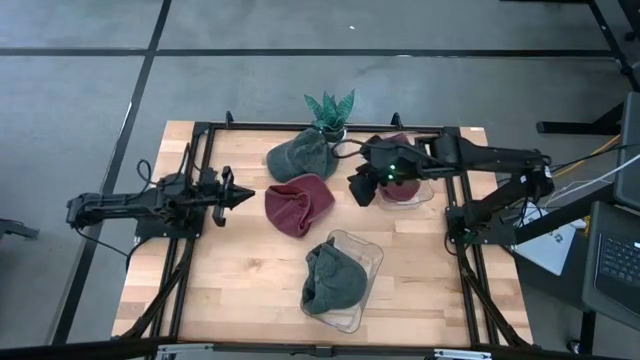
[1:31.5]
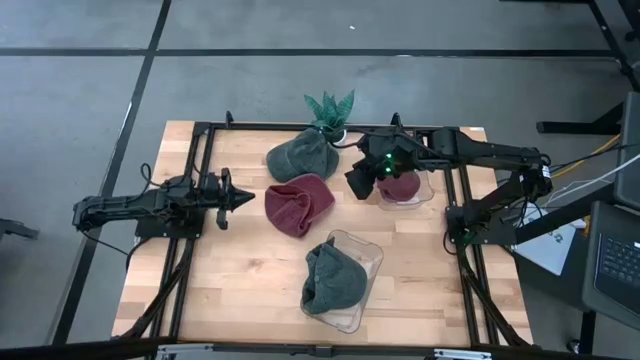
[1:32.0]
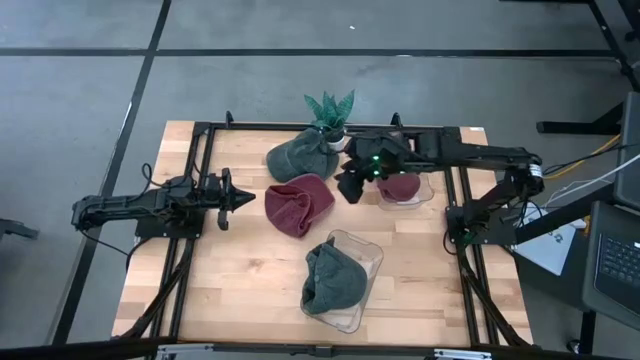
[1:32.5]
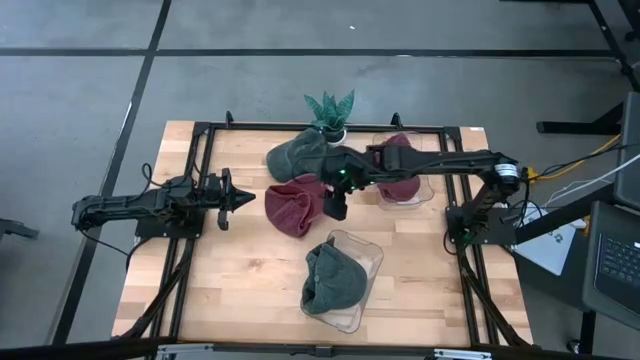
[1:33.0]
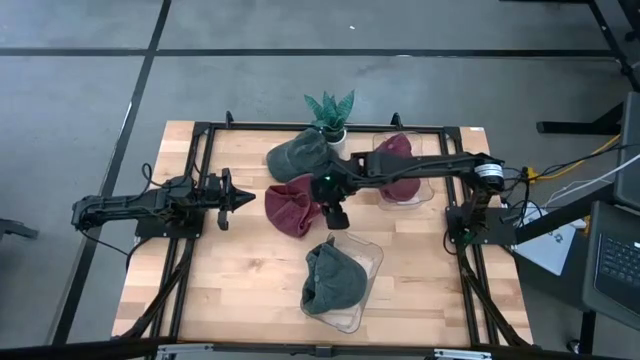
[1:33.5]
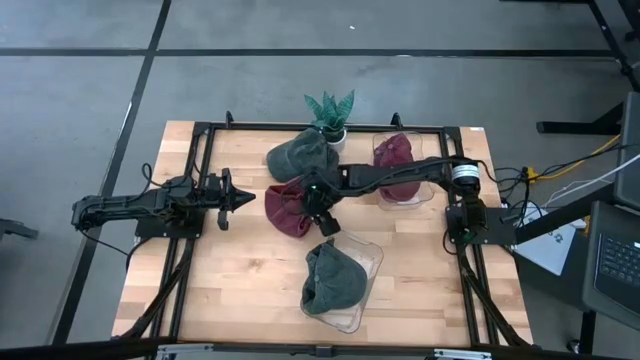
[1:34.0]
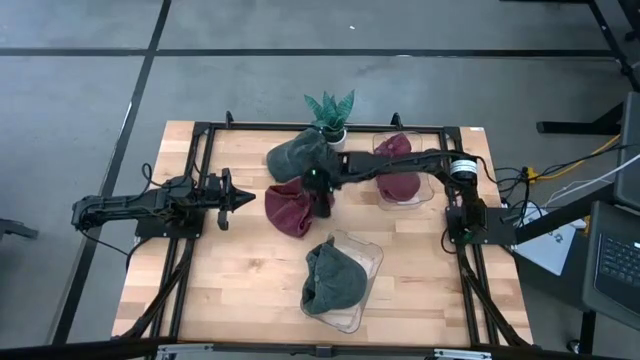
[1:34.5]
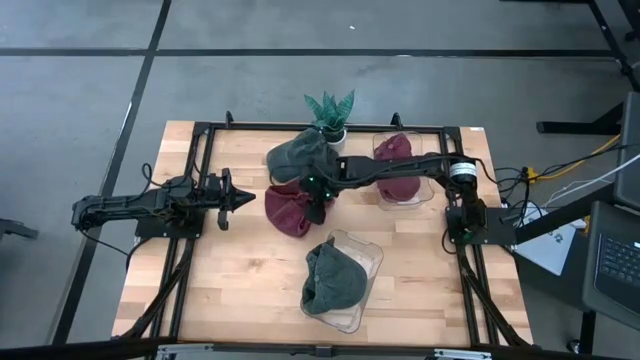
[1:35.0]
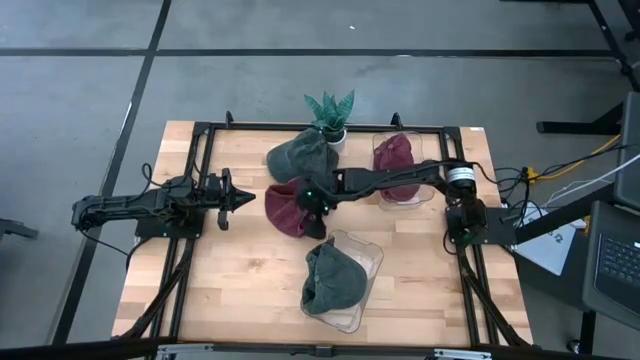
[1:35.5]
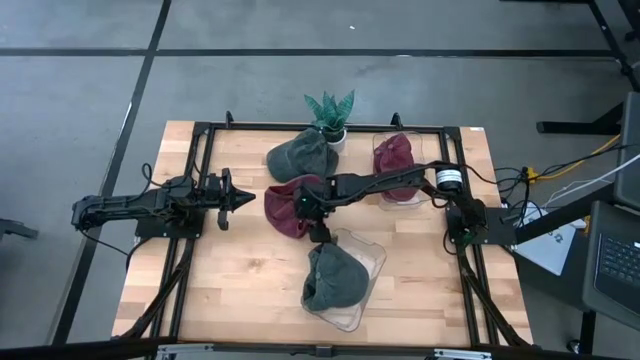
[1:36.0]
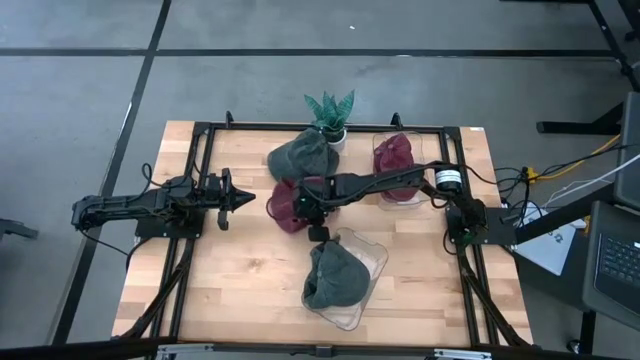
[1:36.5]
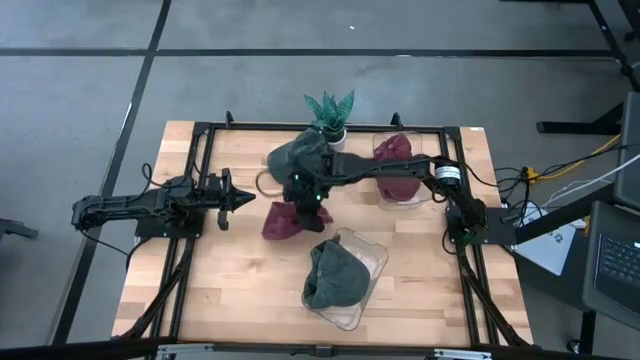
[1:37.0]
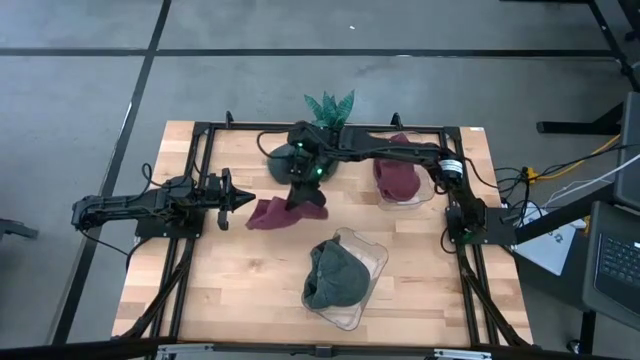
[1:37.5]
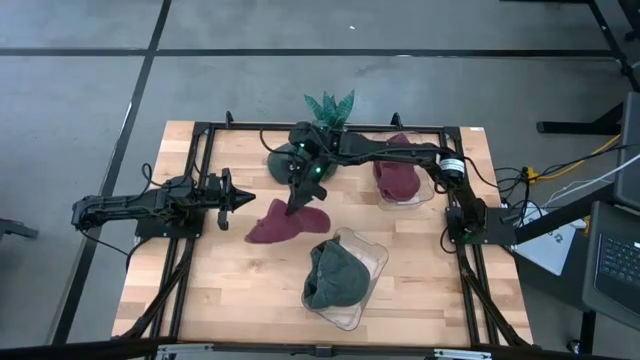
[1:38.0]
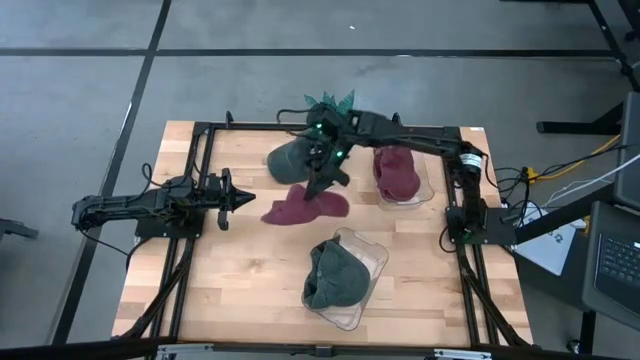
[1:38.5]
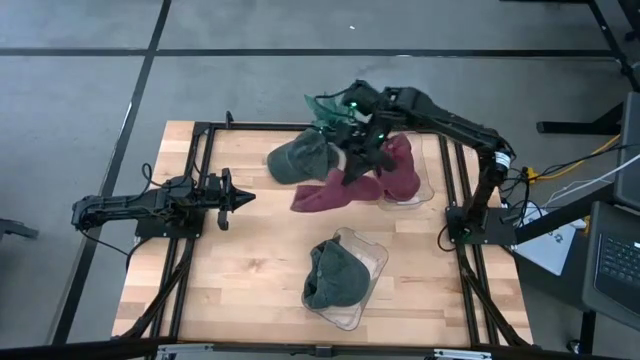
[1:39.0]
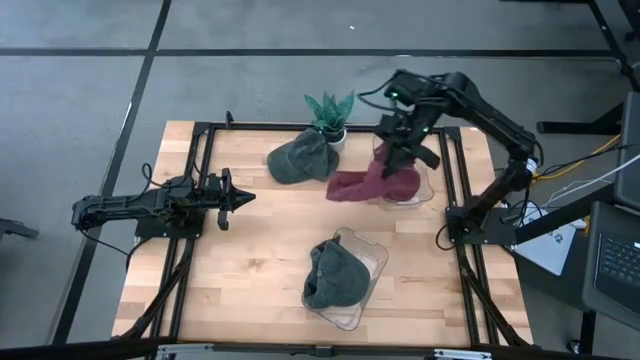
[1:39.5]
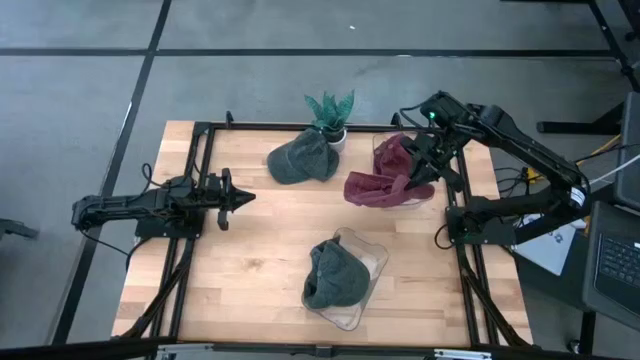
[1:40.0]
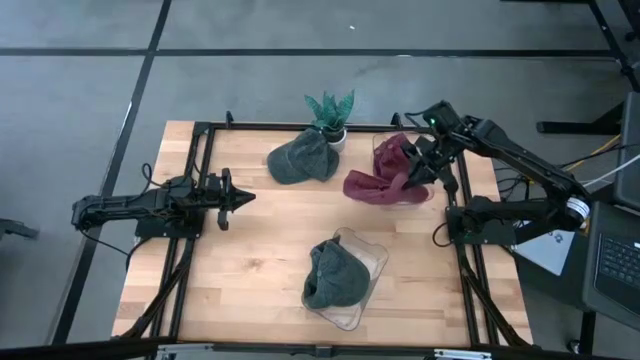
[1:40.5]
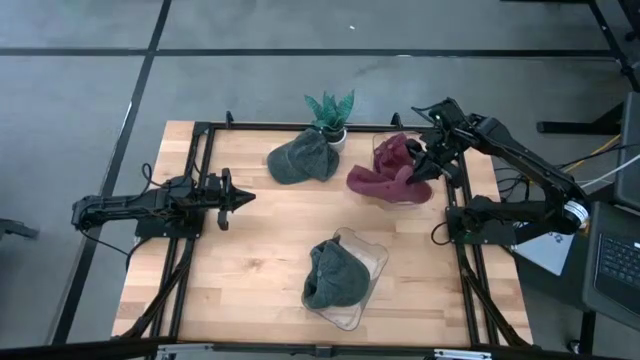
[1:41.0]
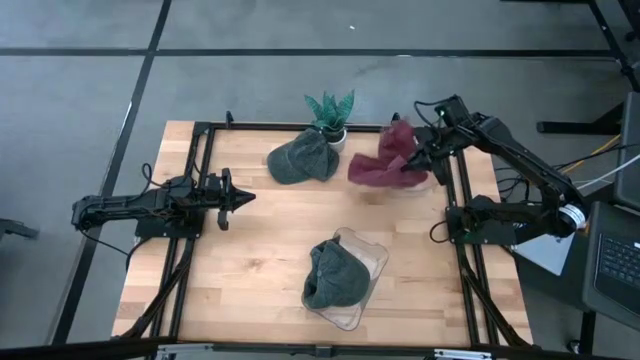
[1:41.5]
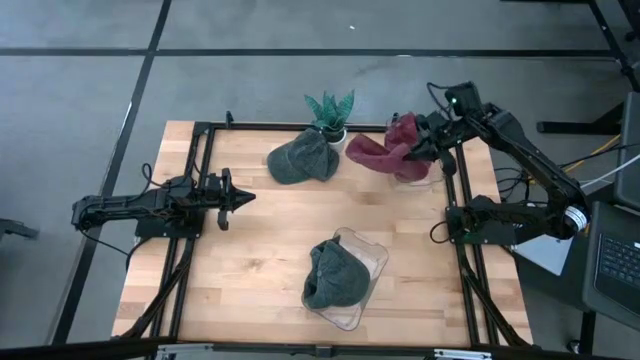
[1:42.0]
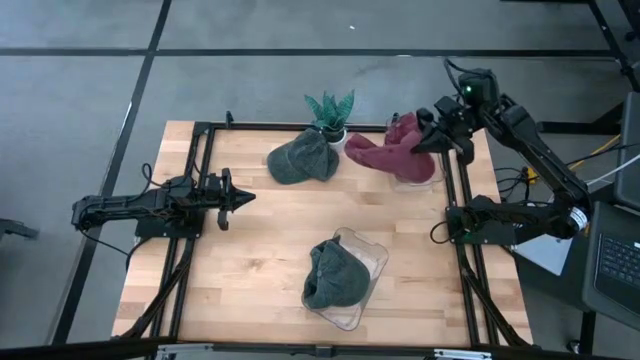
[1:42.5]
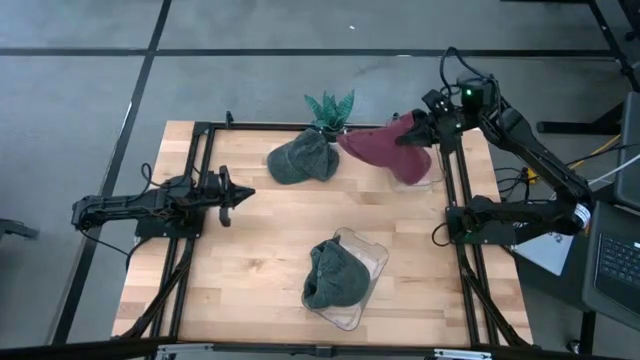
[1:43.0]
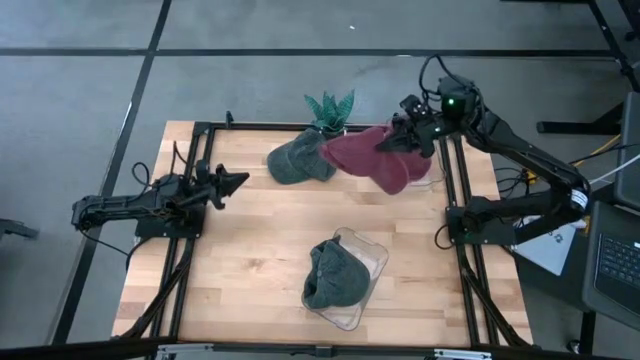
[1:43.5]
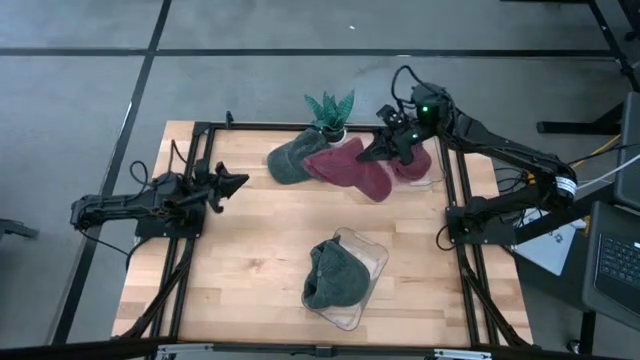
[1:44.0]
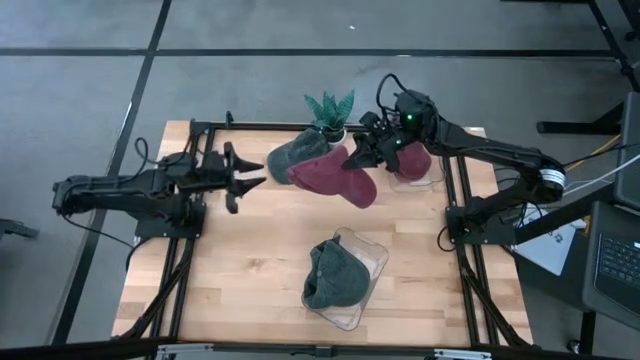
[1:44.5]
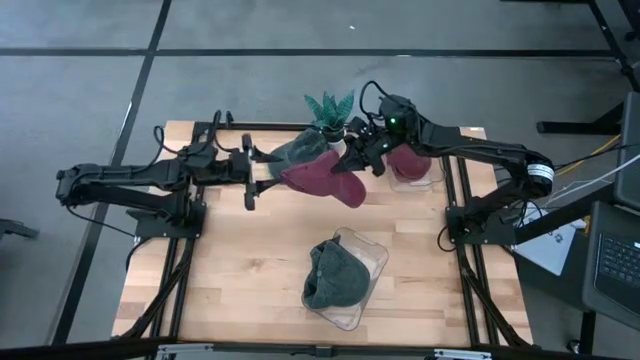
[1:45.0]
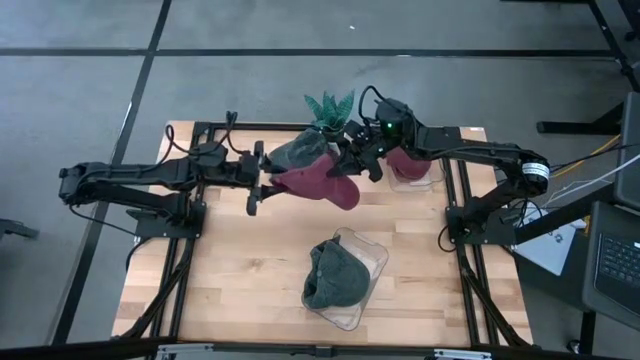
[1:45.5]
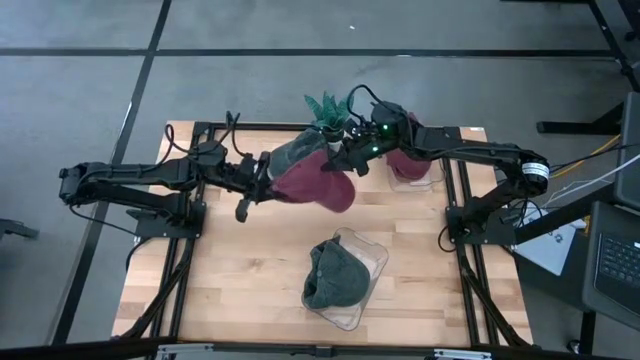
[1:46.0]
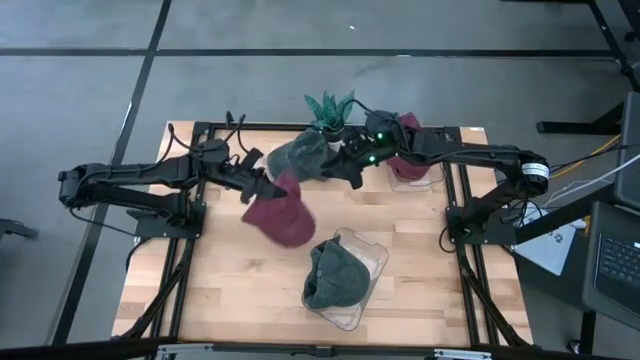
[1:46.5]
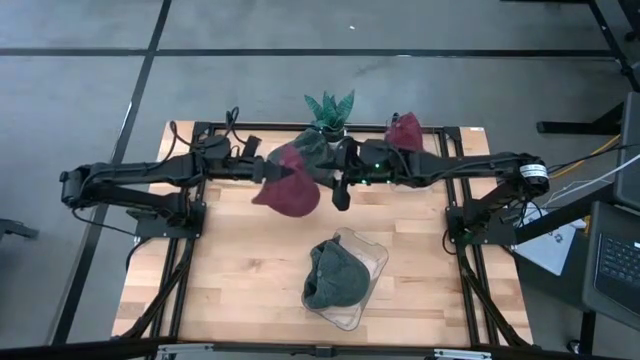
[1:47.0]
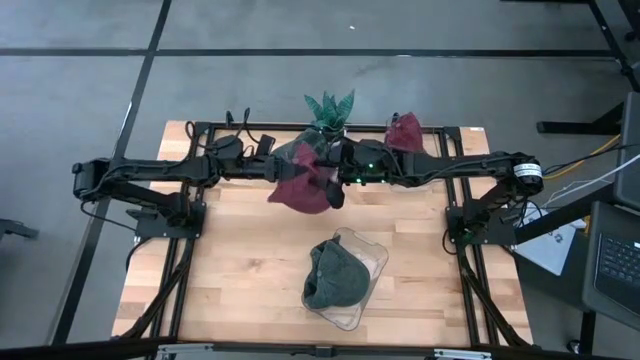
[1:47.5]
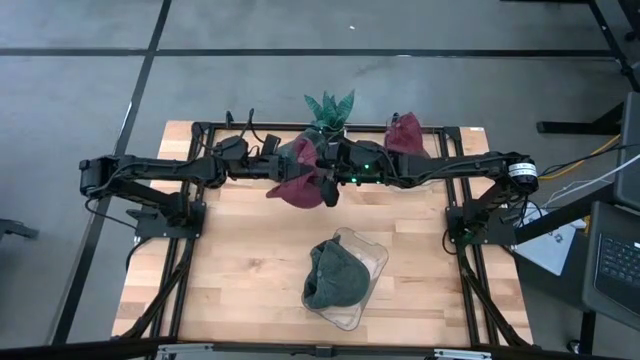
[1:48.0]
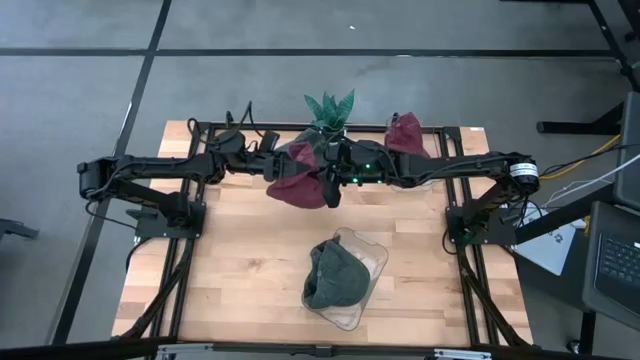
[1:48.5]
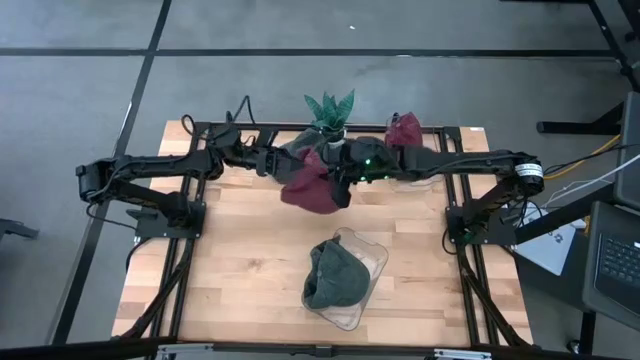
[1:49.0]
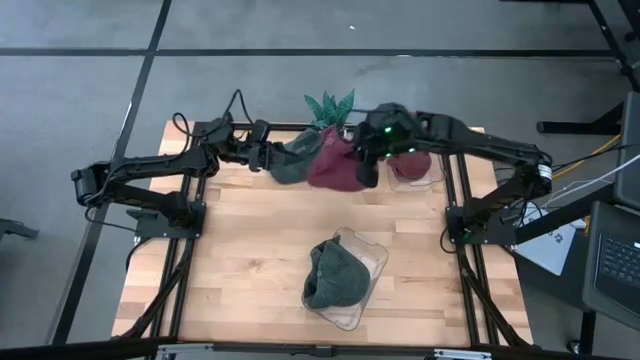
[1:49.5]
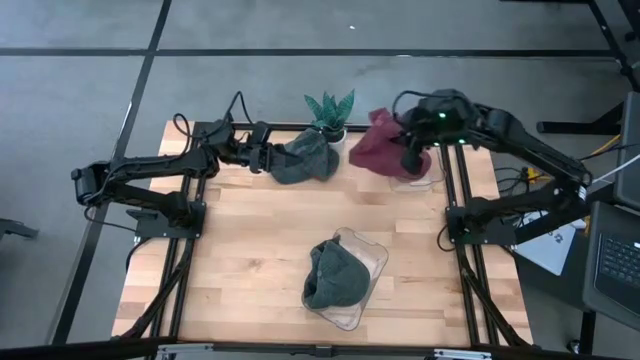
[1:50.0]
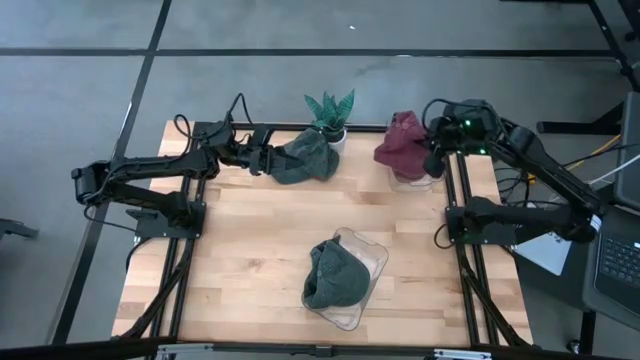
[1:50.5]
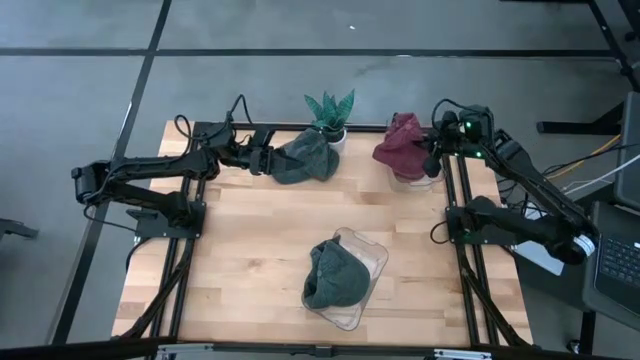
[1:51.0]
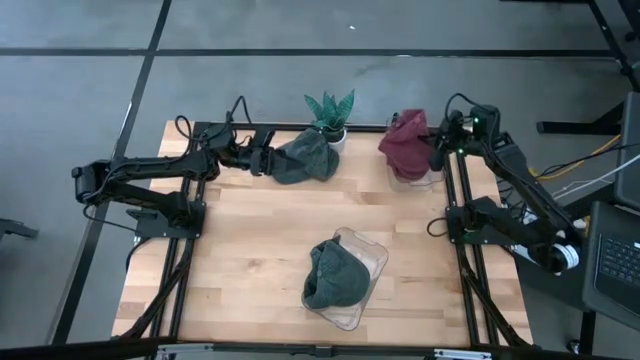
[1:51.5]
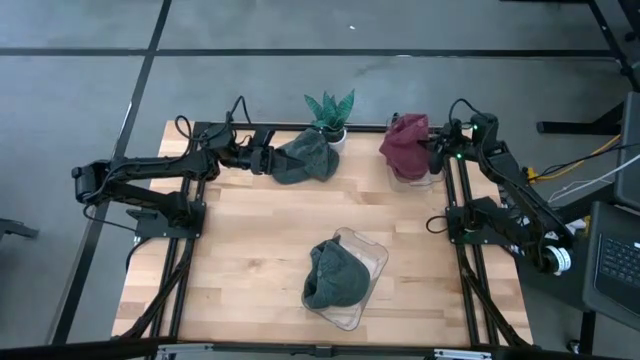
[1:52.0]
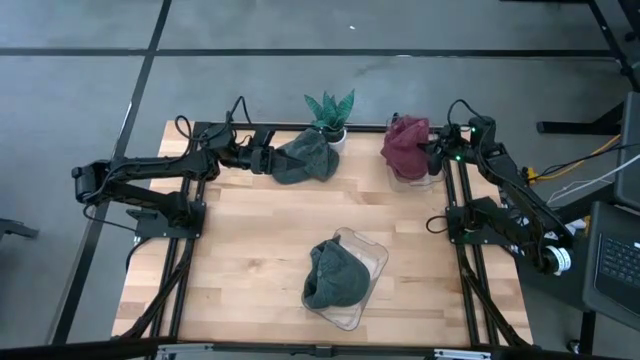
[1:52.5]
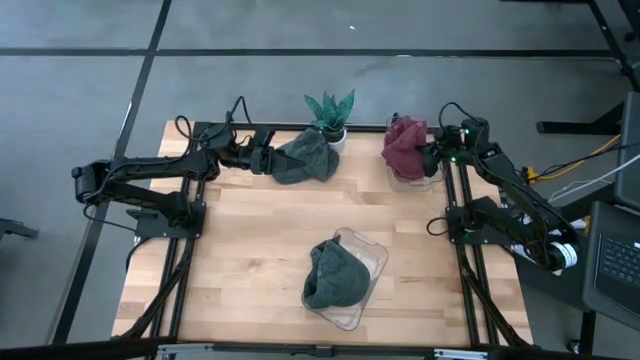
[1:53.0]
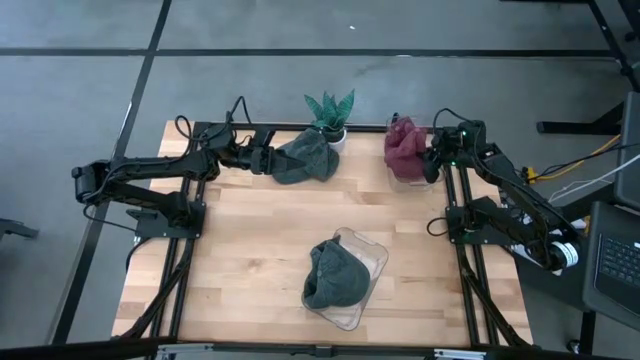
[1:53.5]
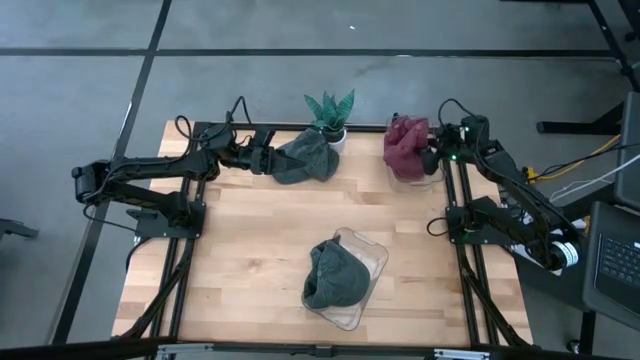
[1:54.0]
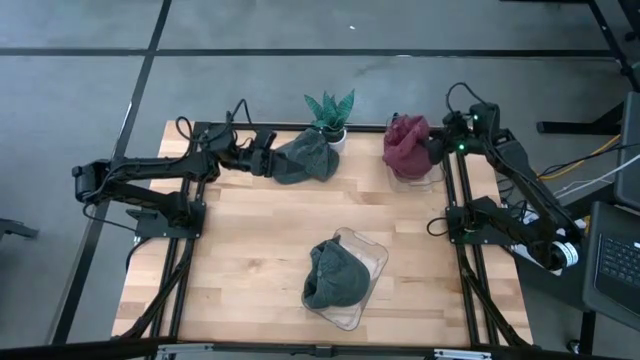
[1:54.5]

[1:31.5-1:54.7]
Task: Pick & Place hat
Put the red cap into the top transparent bin
